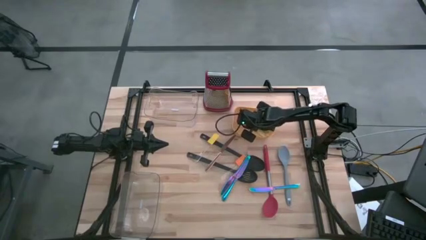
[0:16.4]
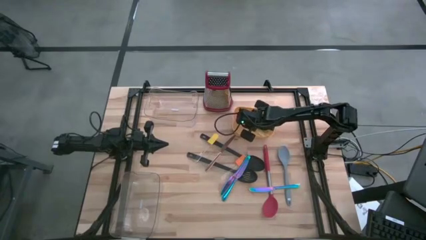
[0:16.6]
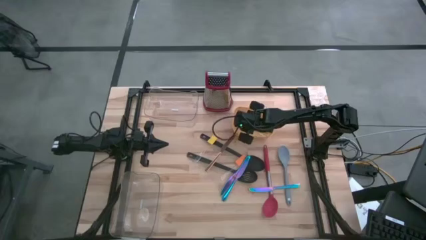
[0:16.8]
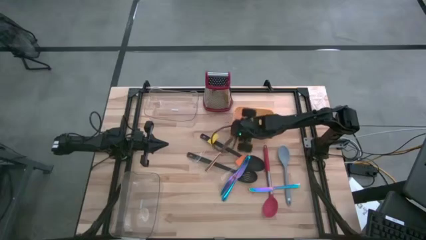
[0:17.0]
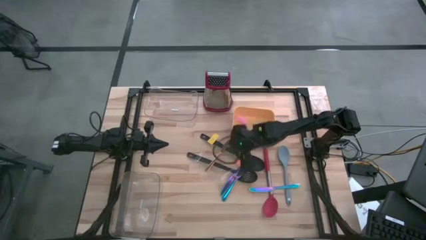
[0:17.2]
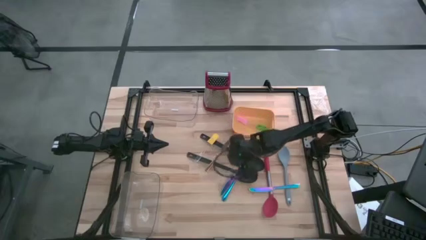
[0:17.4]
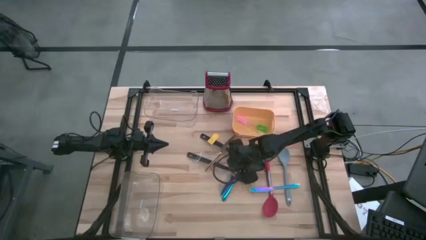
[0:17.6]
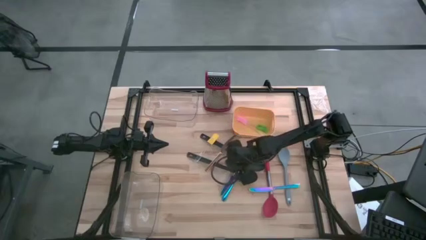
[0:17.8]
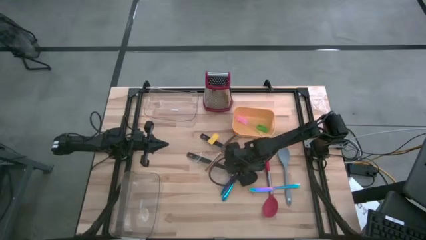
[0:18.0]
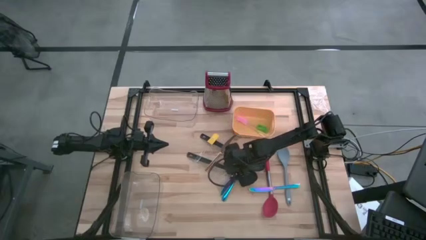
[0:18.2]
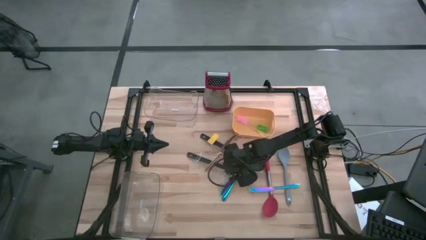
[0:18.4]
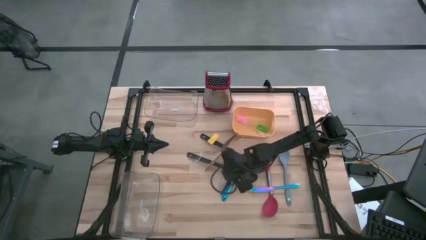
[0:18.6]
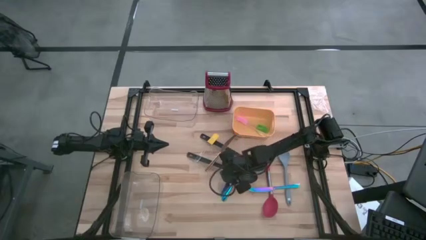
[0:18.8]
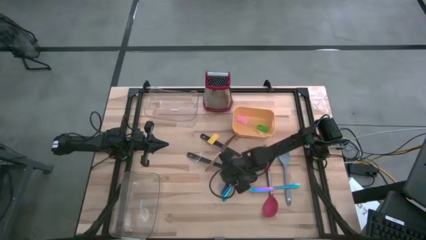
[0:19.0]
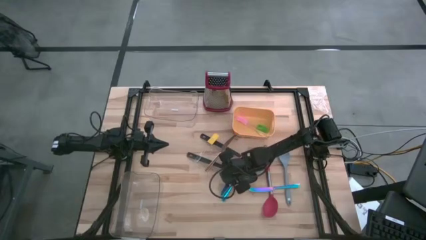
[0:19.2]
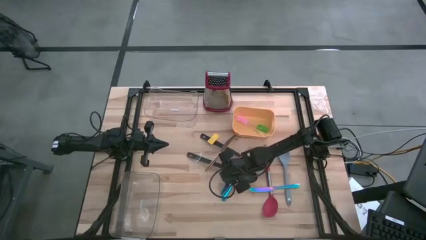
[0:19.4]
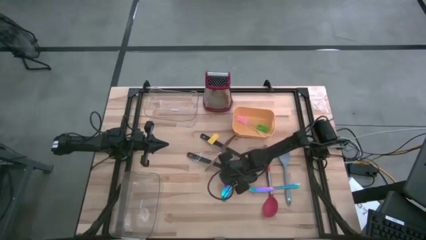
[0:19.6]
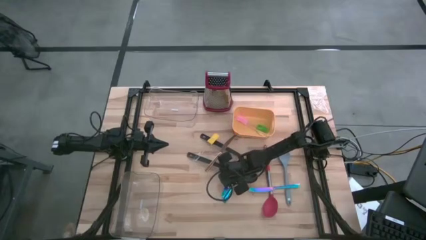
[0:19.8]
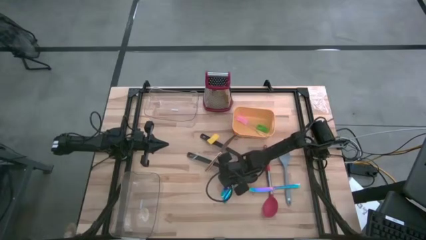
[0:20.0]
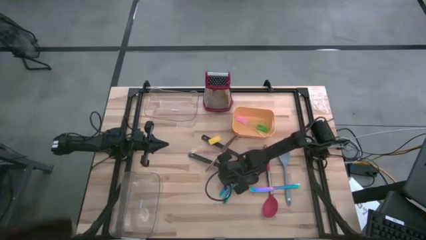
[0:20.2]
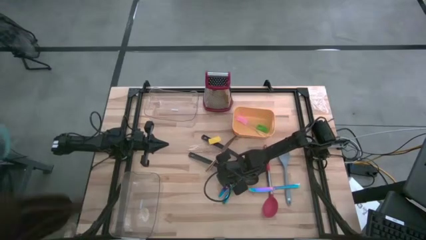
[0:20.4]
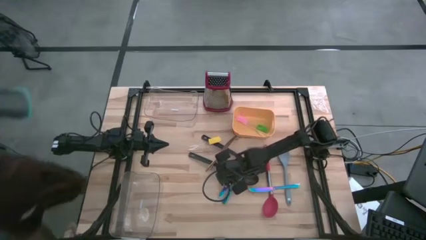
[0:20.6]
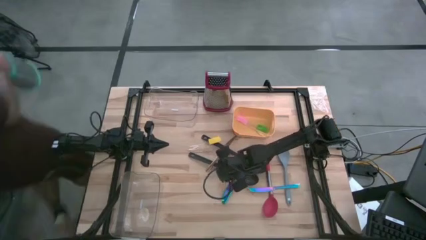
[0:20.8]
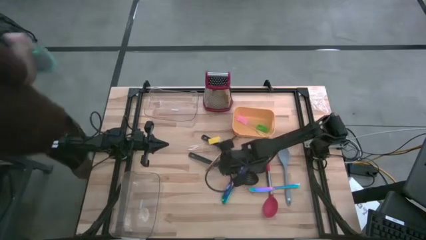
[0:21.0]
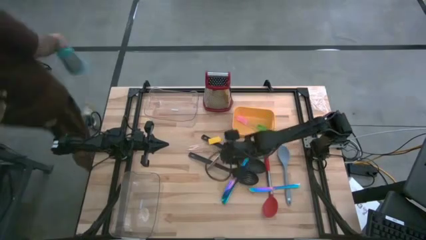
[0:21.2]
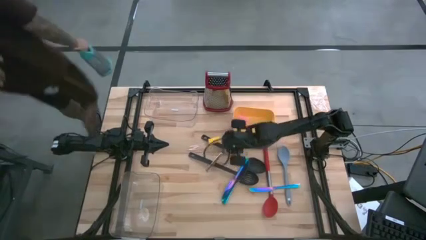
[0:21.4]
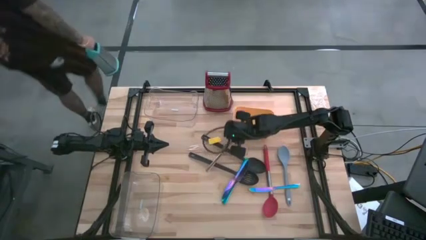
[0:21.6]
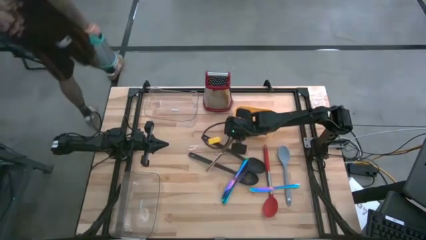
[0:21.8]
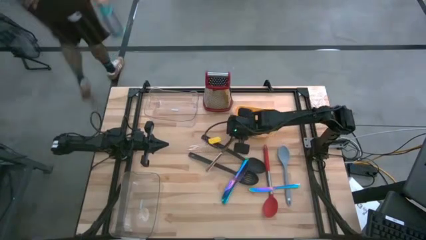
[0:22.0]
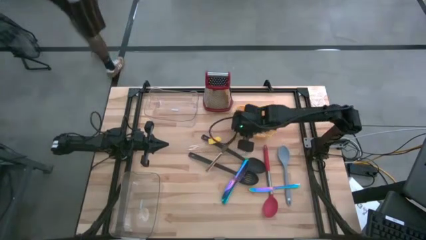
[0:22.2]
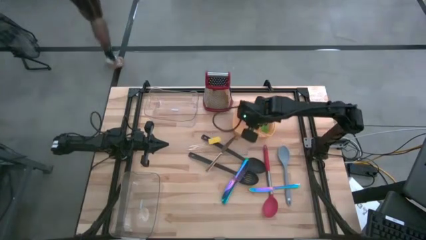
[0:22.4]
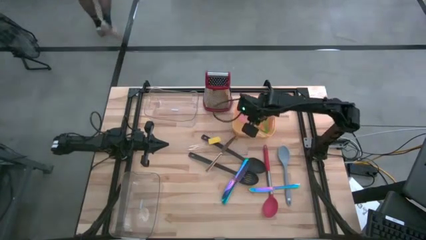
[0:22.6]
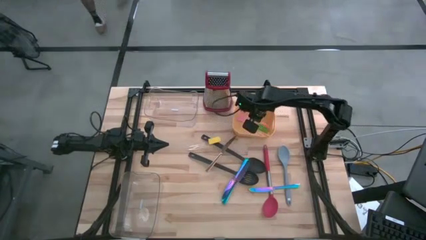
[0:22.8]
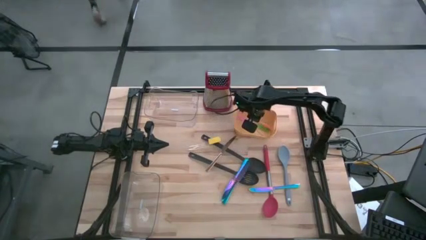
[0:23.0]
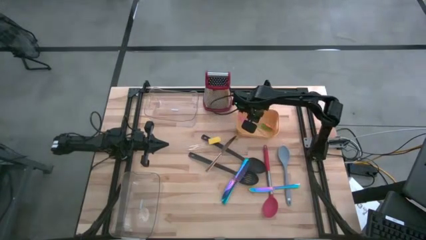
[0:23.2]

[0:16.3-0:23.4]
Task: Pick & Place Kitchen Items
Put the orange spatula into the yellow bin

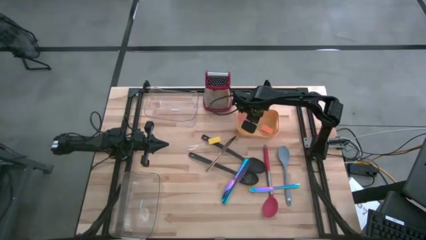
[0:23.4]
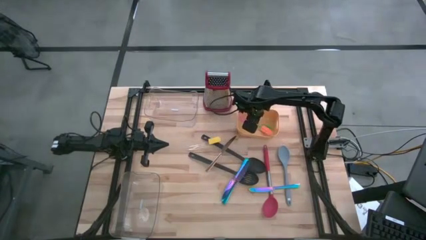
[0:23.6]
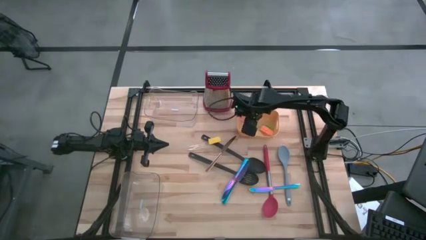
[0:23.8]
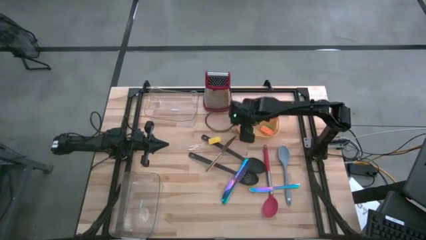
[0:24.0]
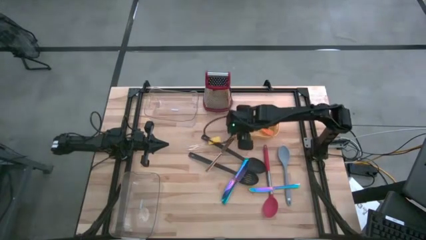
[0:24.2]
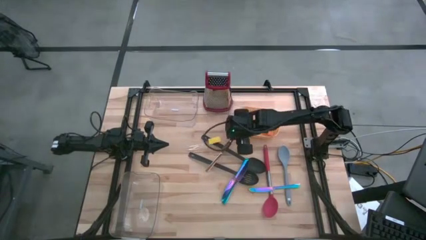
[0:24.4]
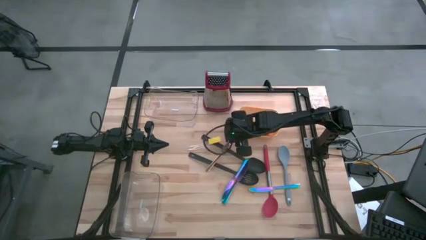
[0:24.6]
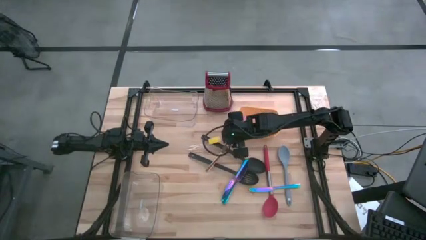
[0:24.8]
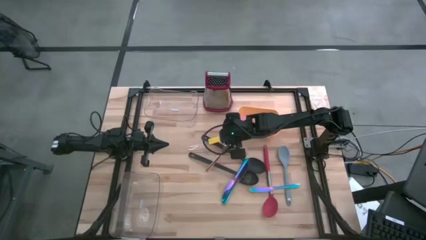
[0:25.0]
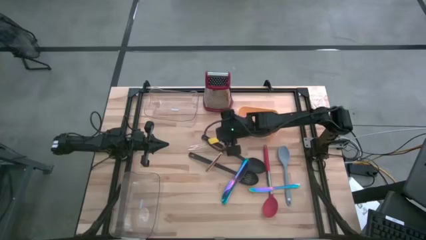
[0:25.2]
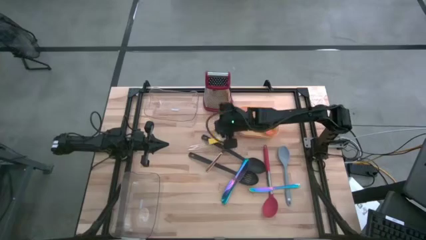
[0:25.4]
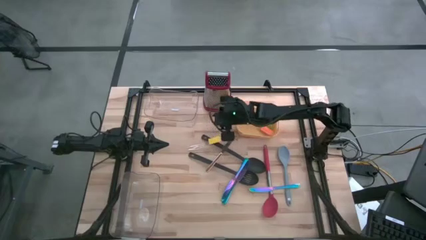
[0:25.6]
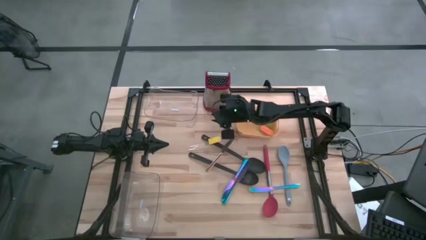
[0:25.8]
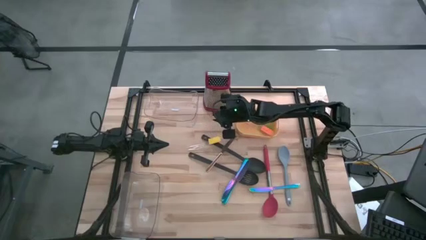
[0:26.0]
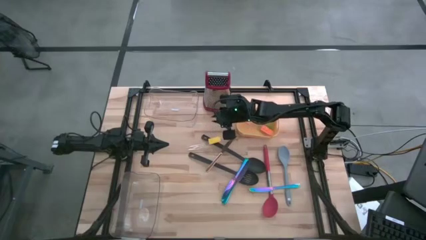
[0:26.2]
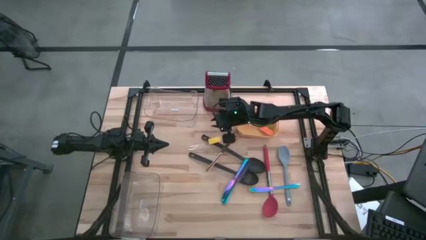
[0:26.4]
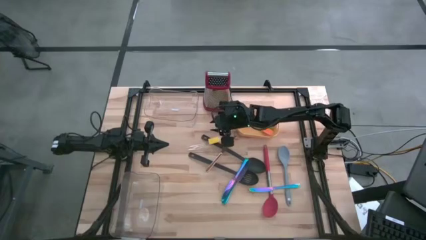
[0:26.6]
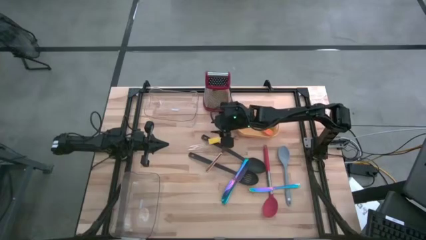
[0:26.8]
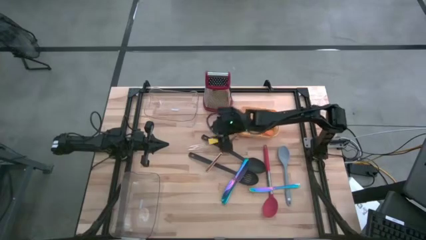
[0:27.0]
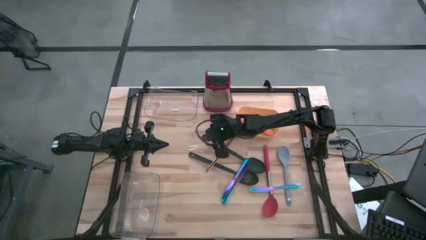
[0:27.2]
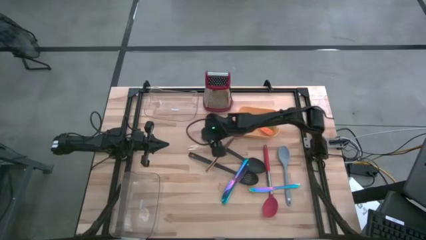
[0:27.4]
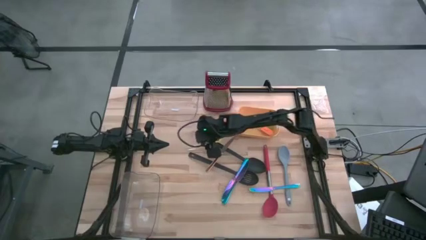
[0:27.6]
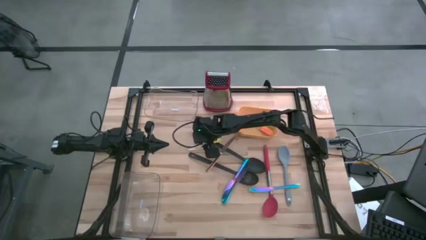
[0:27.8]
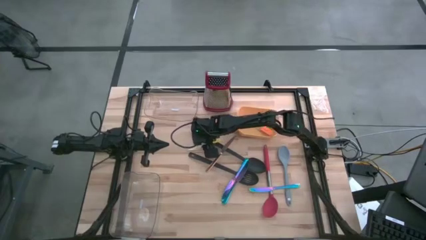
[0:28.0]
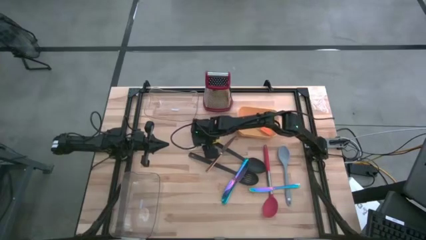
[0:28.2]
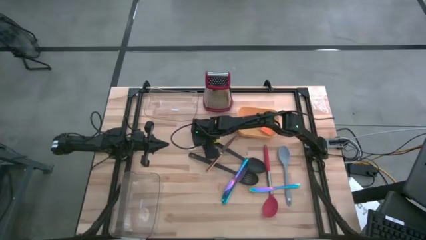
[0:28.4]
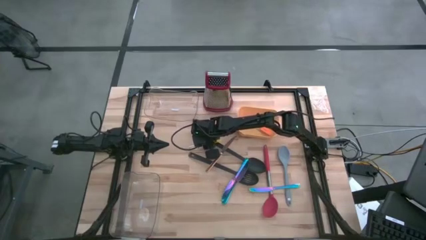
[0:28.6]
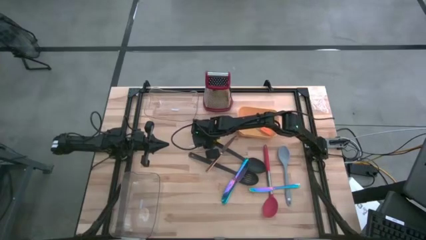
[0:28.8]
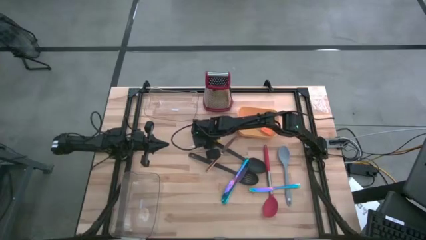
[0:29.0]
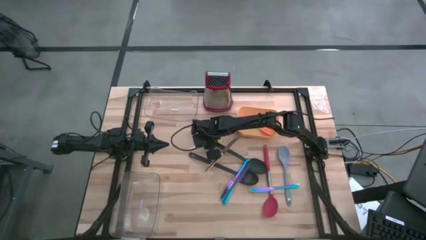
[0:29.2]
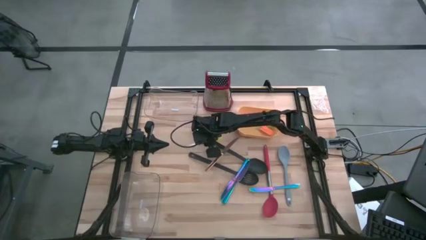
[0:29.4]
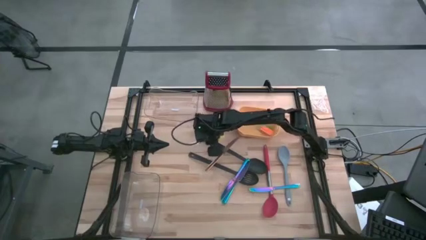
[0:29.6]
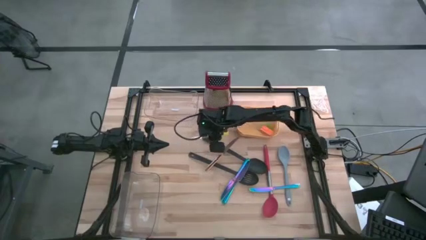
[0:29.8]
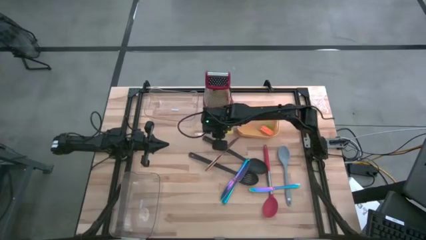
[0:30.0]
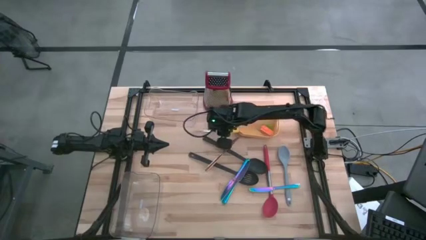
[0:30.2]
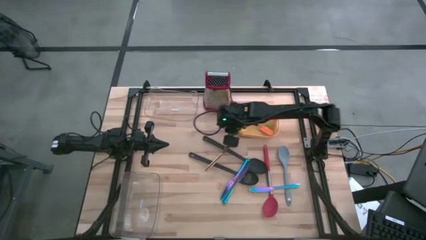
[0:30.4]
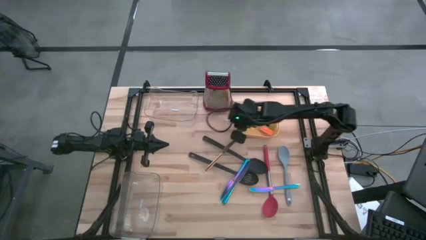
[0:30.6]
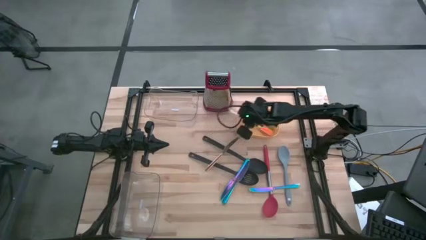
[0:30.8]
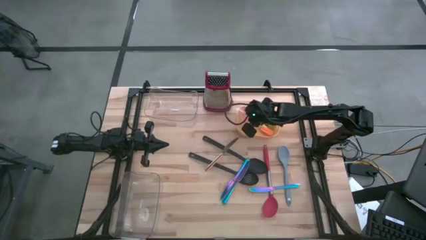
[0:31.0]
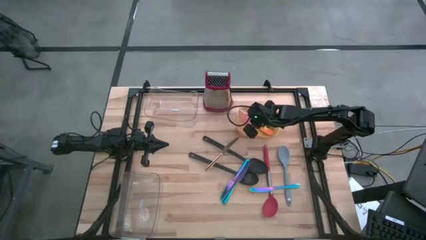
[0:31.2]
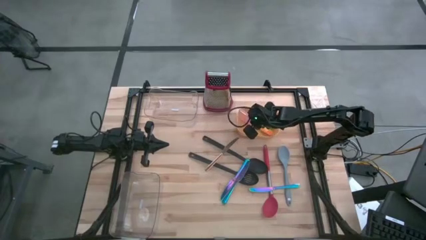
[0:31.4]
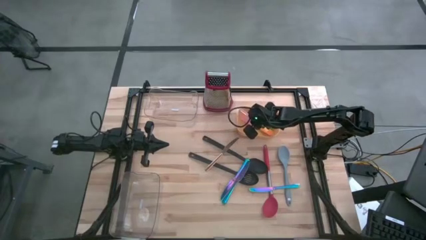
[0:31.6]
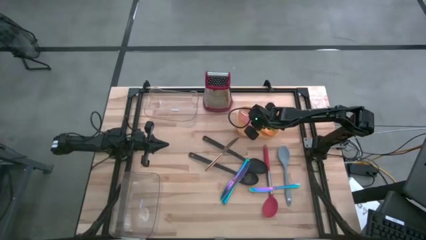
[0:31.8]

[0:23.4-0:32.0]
Put the yellow spatula into the yellow bin

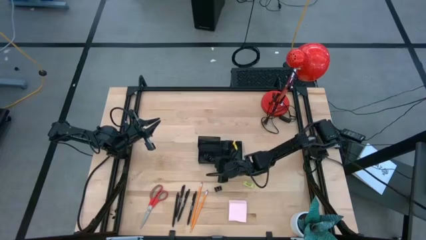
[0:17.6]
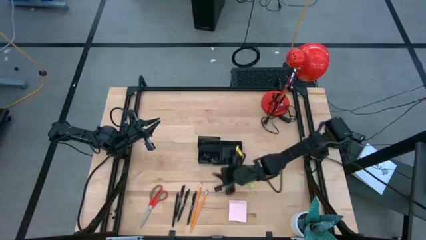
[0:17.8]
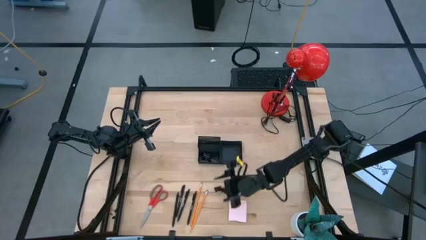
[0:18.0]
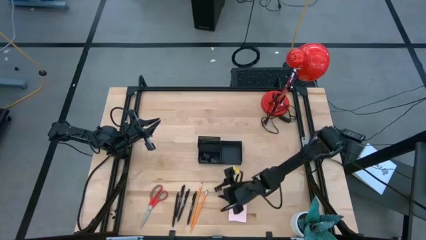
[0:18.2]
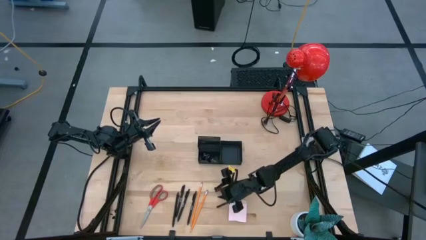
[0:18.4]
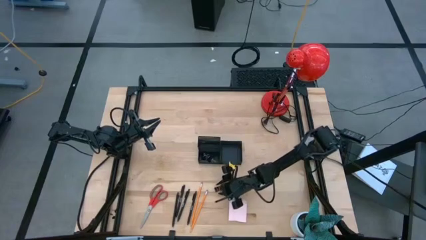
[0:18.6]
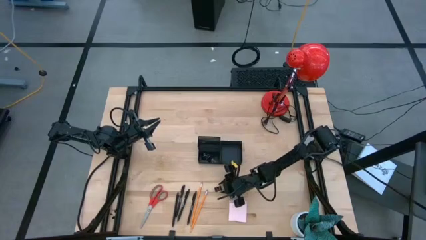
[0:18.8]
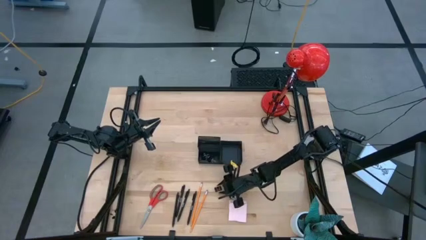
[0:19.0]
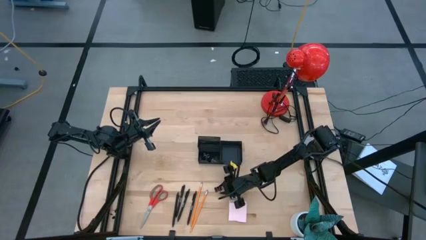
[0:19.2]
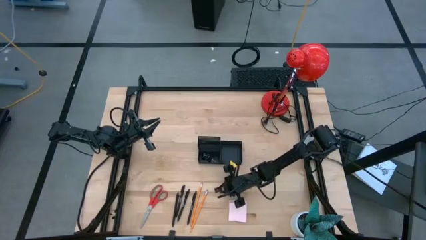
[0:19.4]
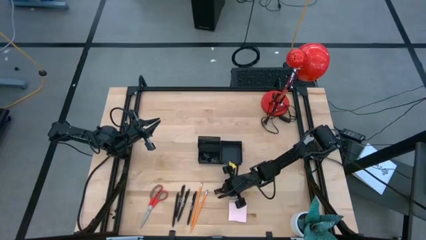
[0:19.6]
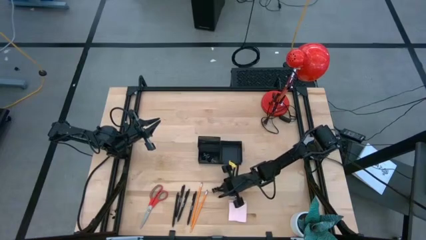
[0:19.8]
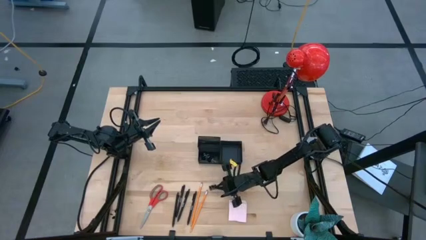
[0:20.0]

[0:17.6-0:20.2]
Task: Pick and place office supplies into organizer
Put the black binder clip into the black desk organizer
